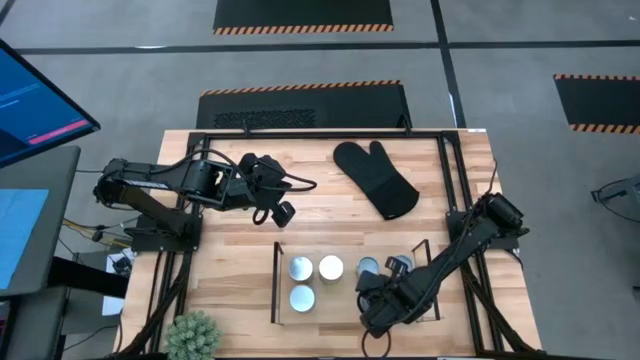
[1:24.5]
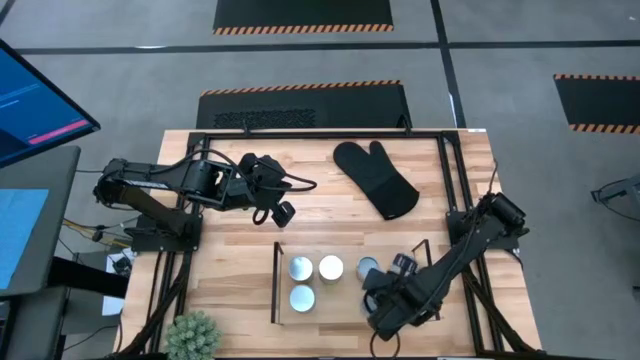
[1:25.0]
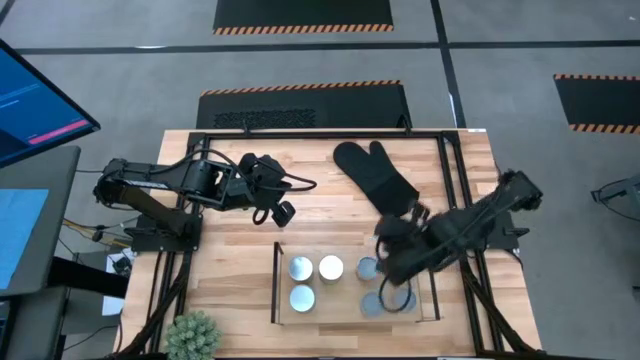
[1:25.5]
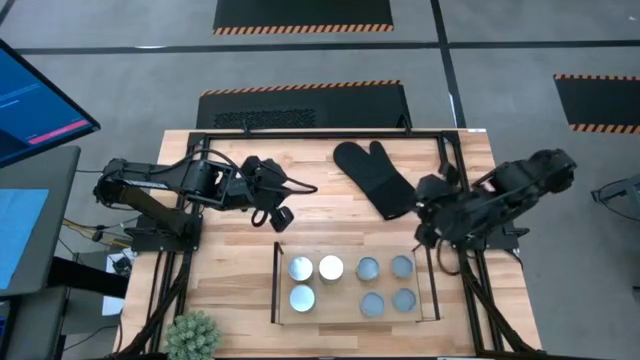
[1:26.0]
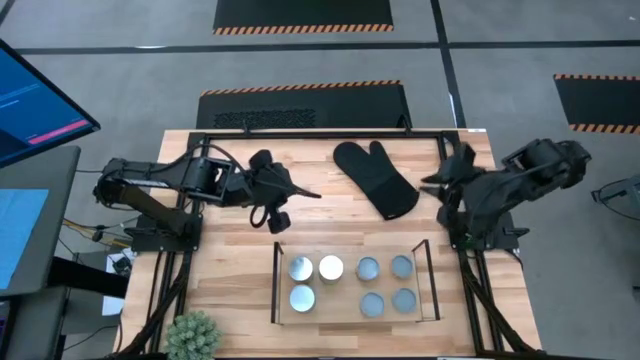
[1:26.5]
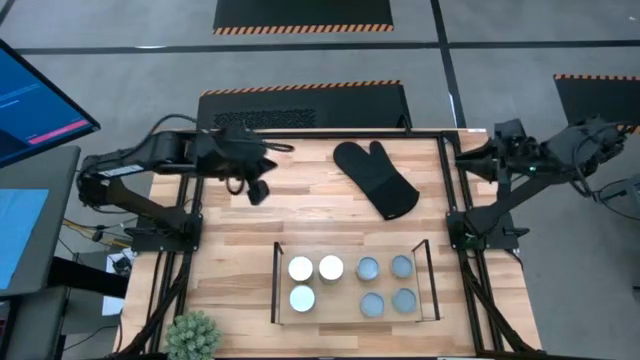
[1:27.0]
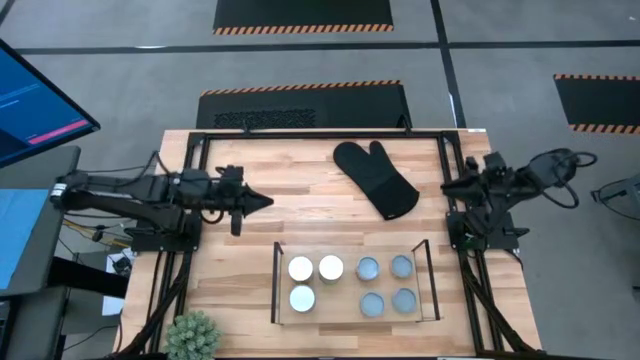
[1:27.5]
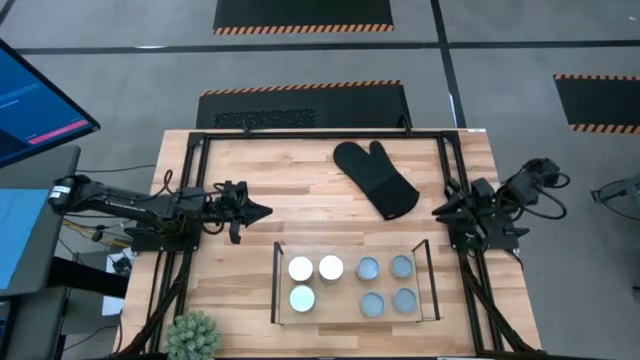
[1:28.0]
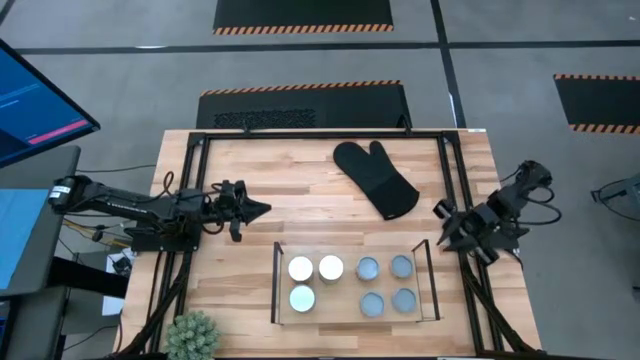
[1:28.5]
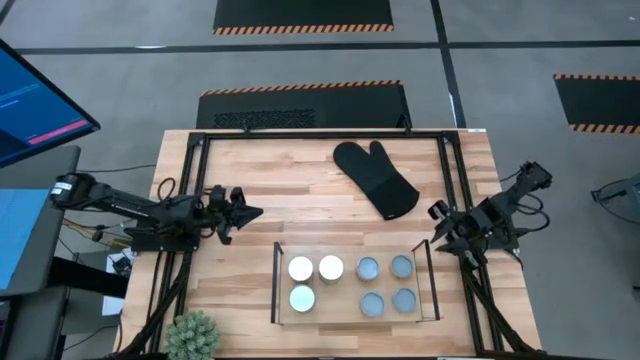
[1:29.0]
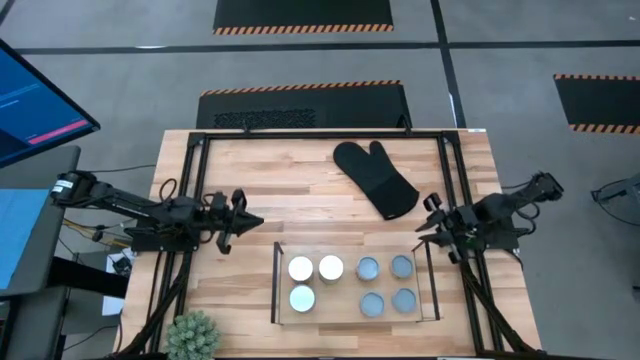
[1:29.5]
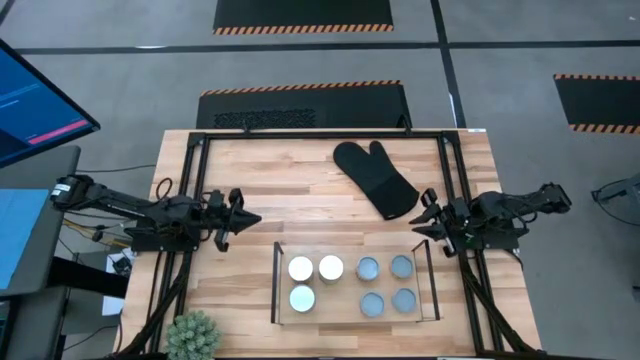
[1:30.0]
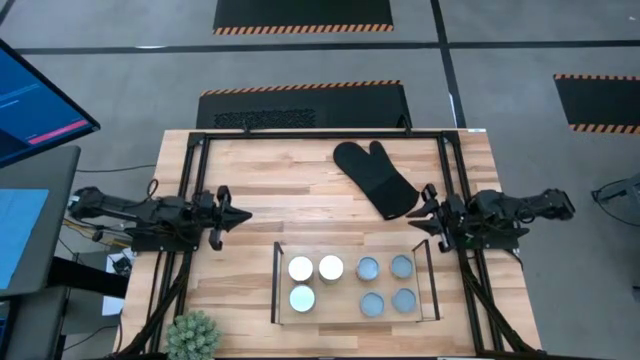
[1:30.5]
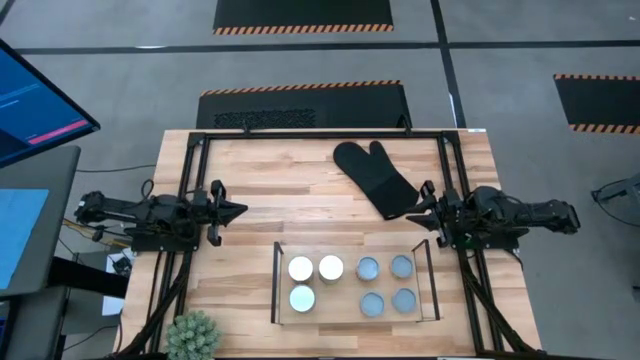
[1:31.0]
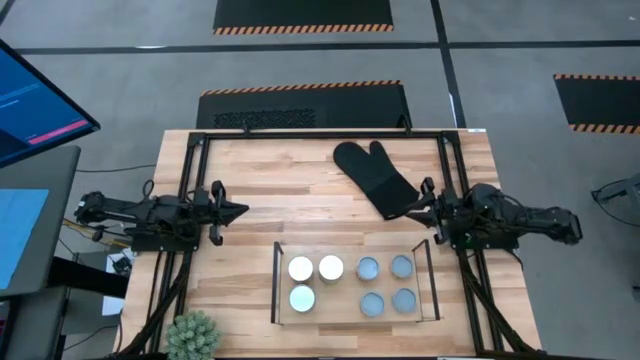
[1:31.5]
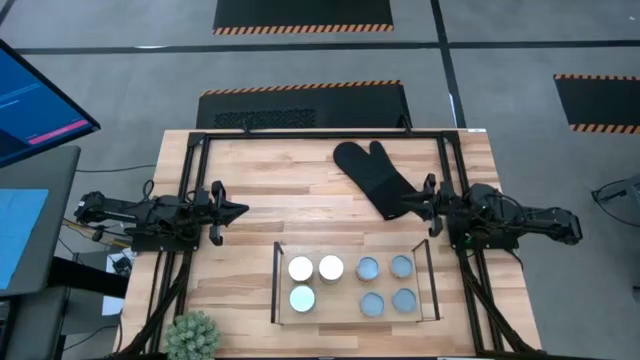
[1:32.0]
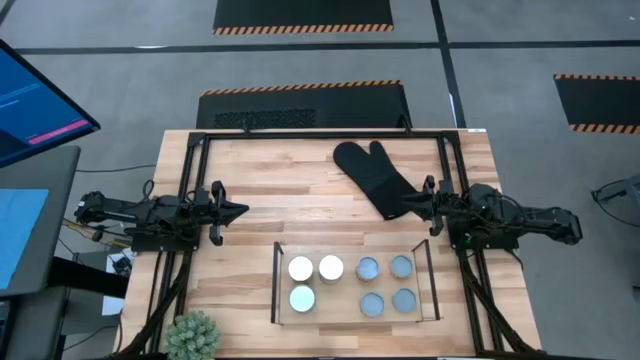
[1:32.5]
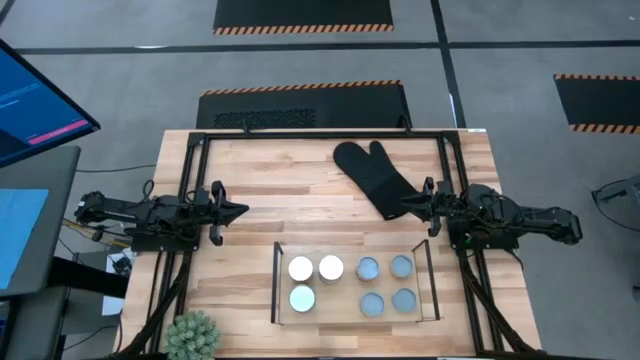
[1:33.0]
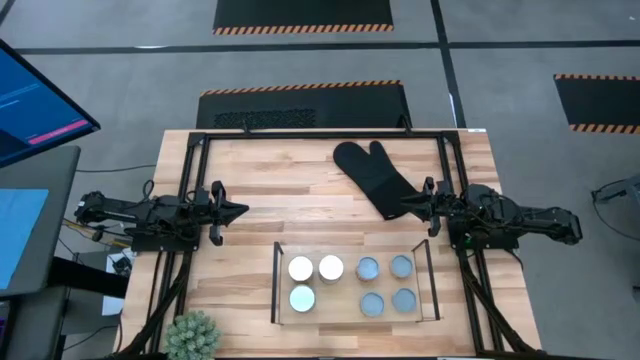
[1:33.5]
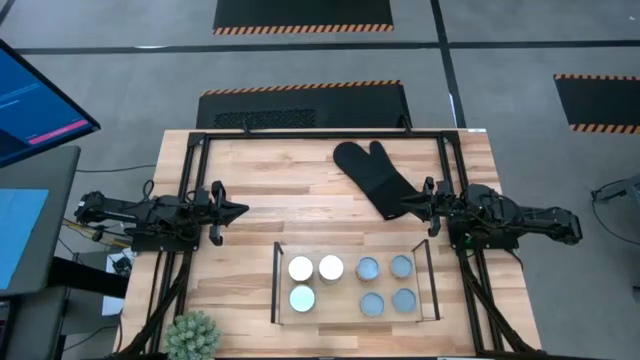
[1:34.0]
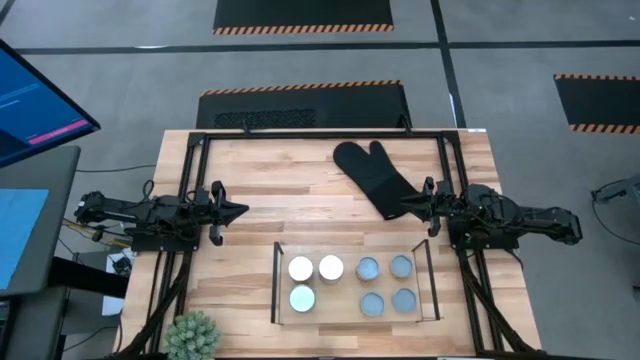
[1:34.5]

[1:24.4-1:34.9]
Task: Pick and place cans onto a shelf
Return to Home Position

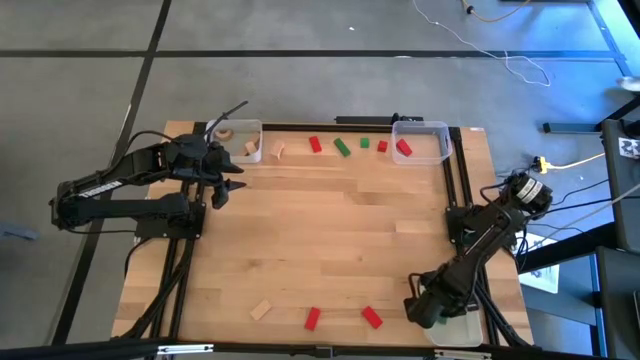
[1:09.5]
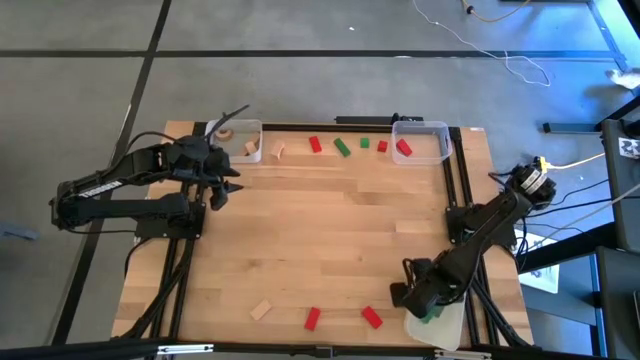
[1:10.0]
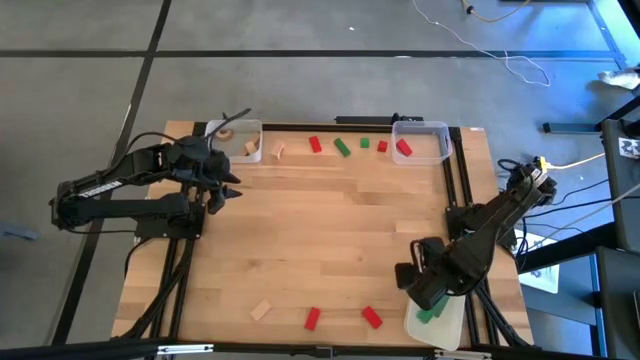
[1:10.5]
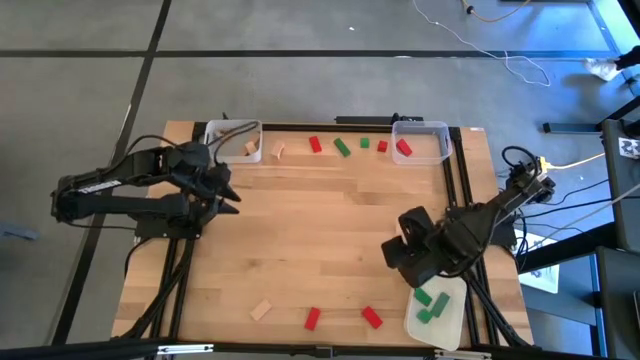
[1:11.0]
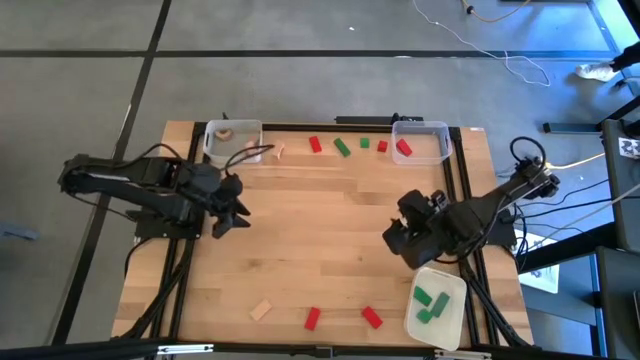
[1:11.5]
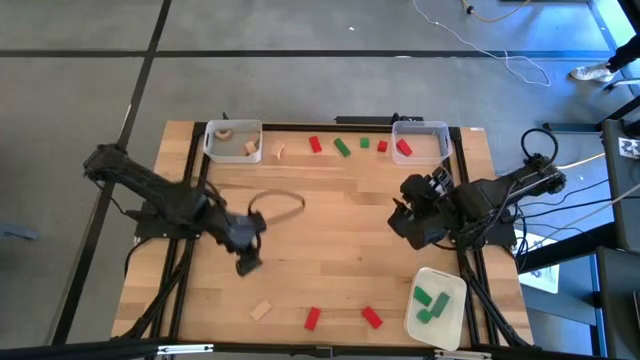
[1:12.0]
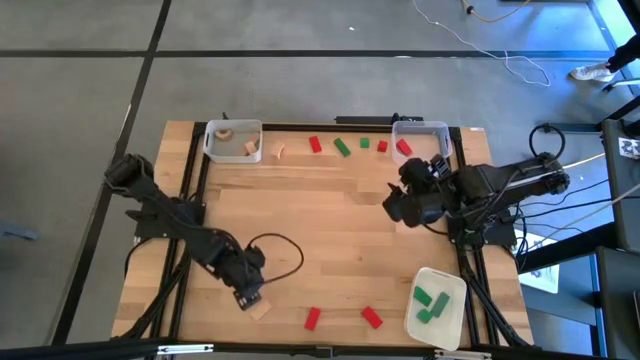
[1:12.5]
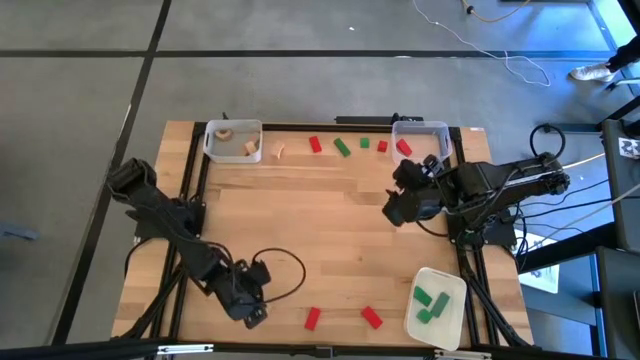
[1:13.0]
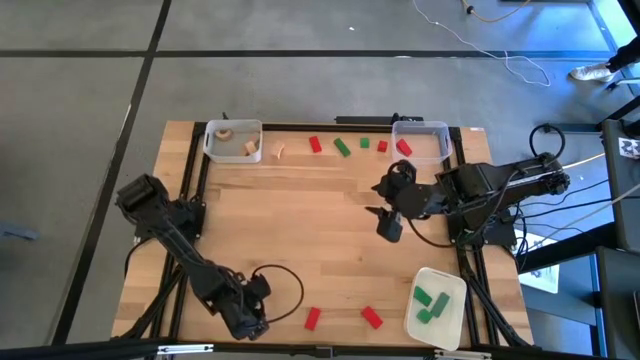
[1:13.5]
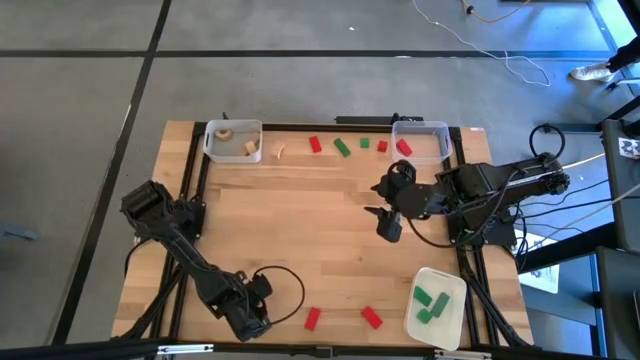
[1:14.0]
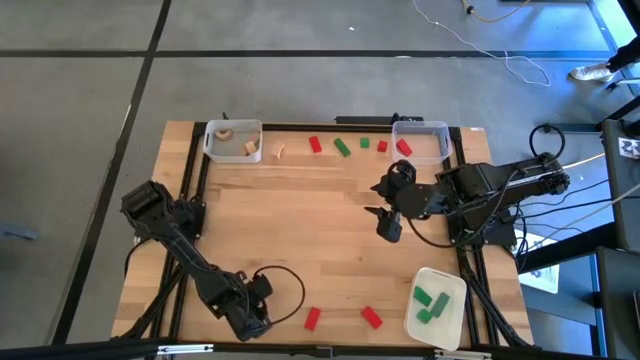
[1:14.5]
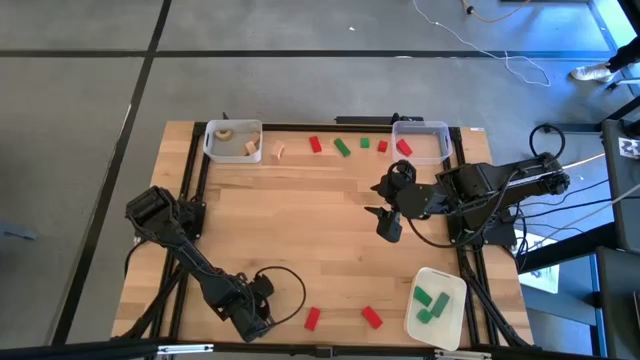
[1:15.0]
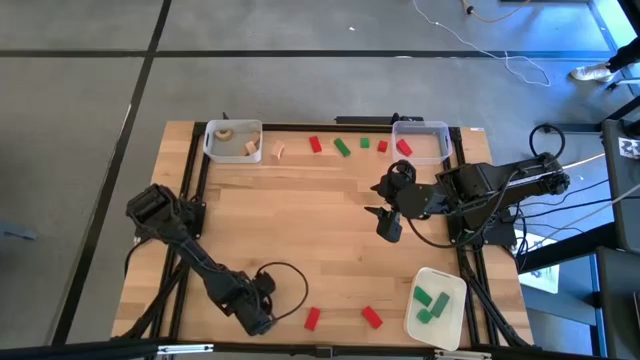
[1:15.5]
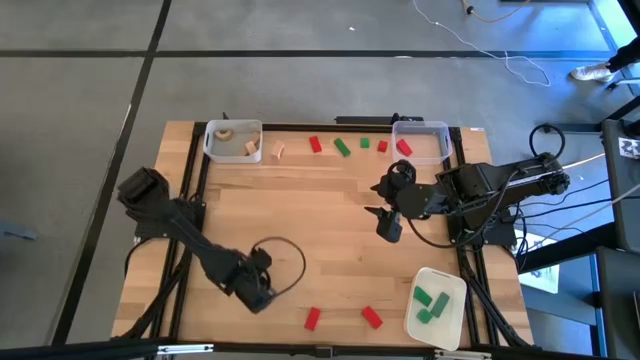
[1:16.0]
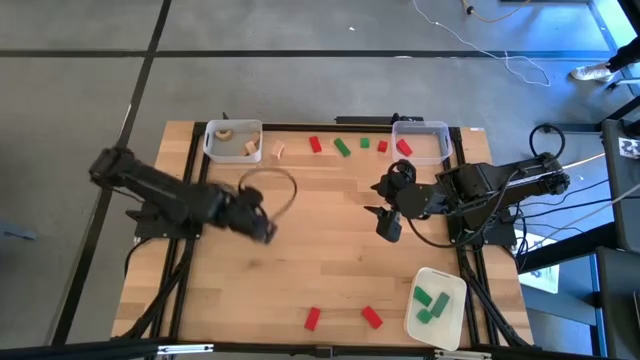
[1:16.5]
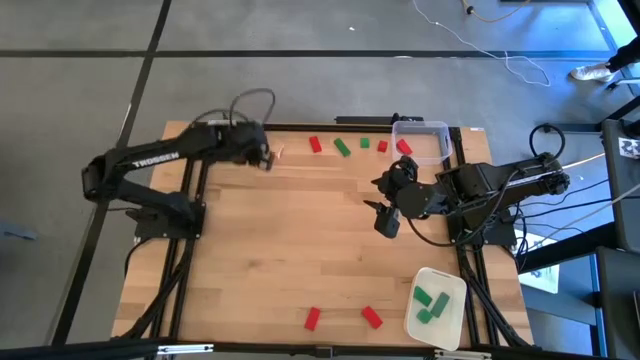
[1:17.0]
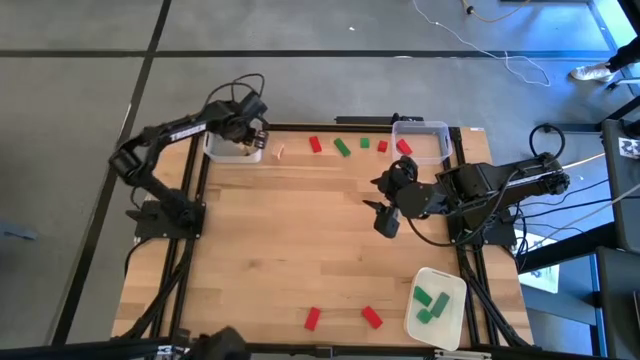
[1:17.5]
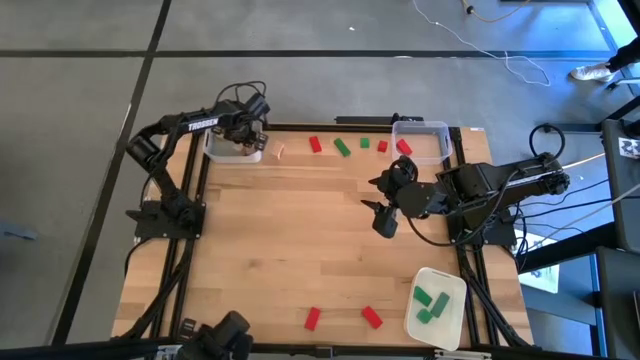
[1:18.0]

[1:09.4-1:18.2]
Task: Sort & place blocks by color
Put the light brown block into the gray bin
